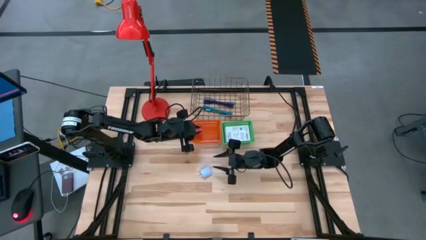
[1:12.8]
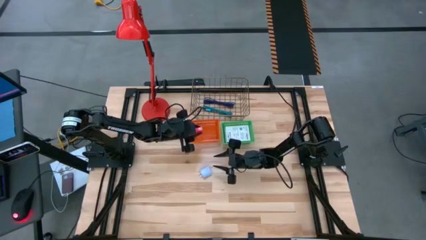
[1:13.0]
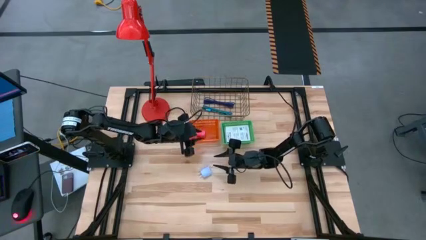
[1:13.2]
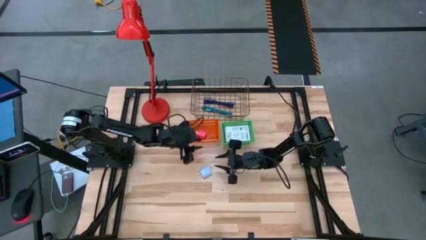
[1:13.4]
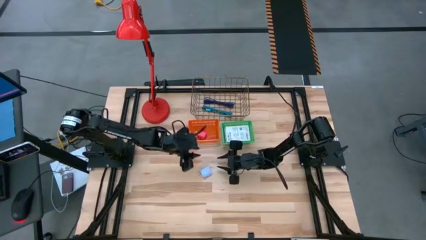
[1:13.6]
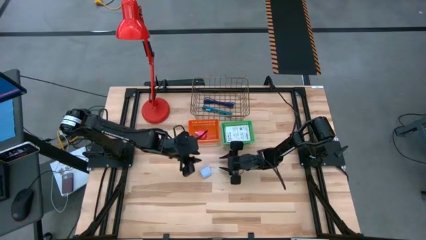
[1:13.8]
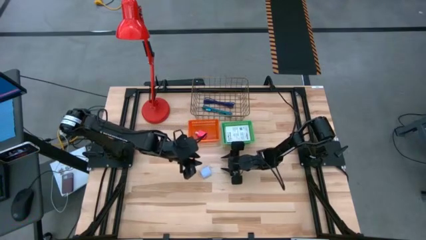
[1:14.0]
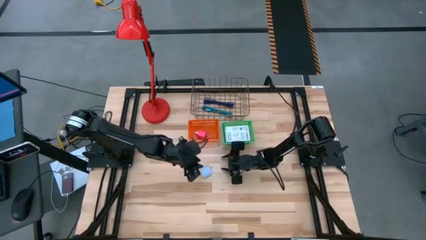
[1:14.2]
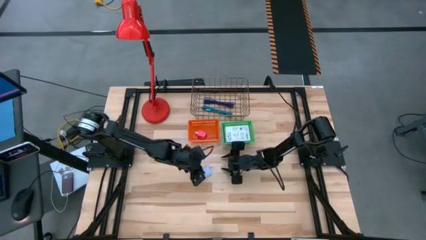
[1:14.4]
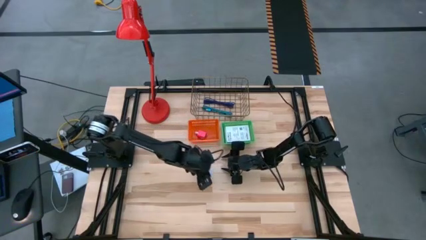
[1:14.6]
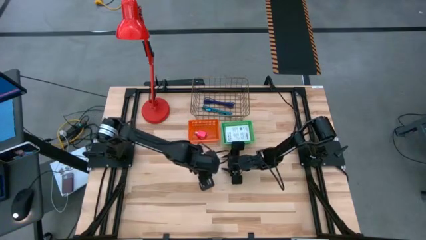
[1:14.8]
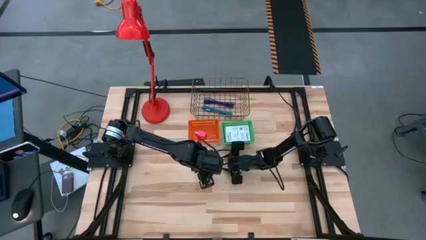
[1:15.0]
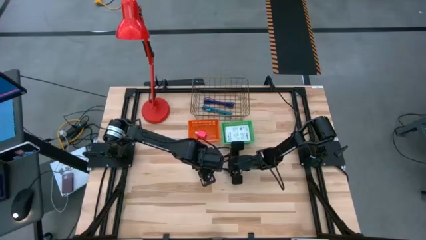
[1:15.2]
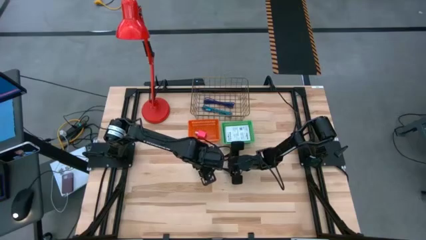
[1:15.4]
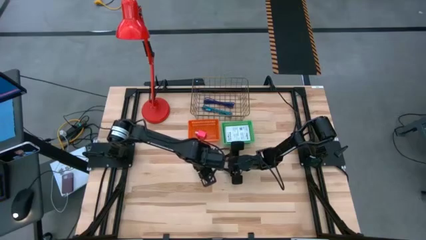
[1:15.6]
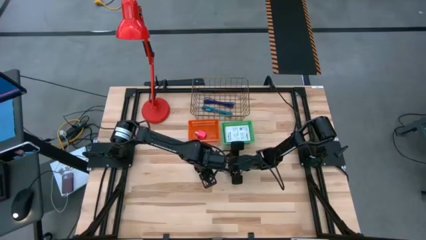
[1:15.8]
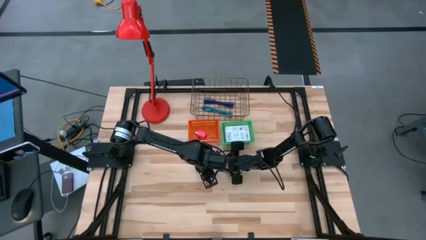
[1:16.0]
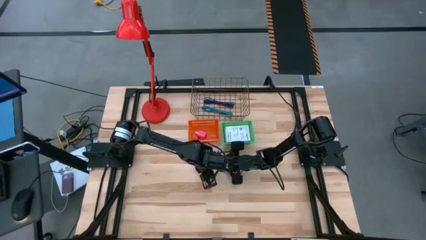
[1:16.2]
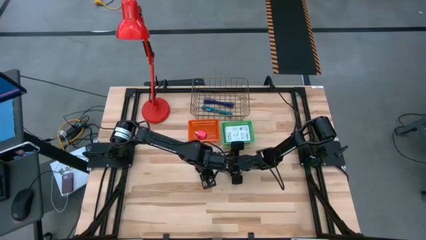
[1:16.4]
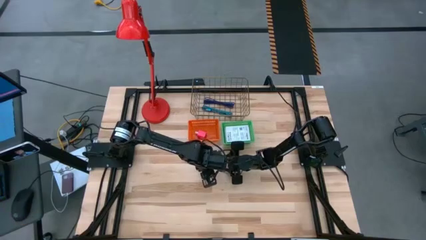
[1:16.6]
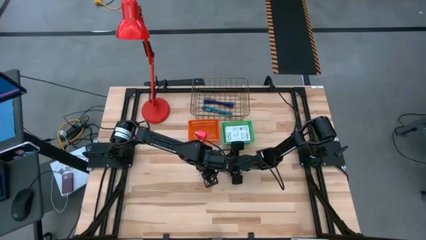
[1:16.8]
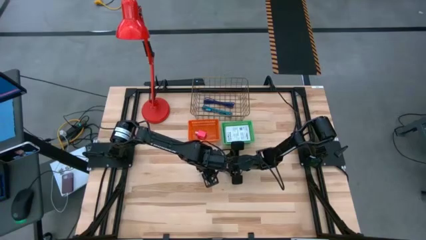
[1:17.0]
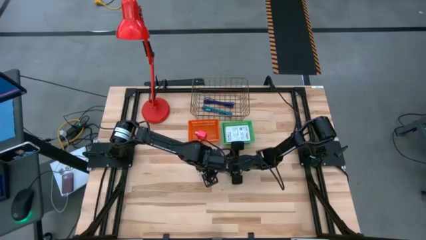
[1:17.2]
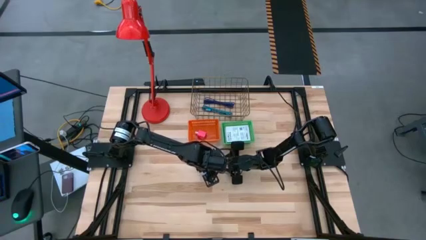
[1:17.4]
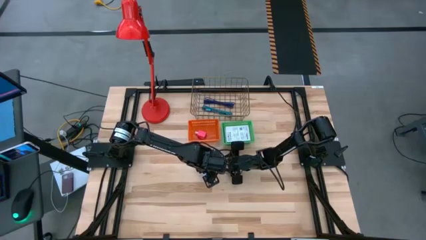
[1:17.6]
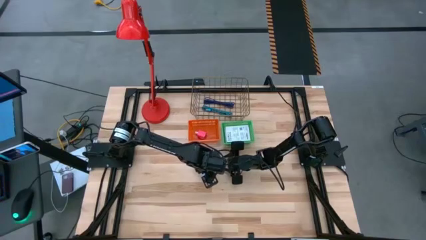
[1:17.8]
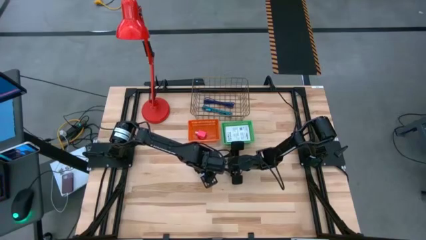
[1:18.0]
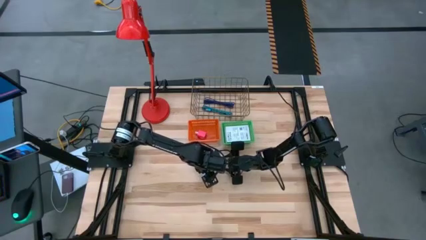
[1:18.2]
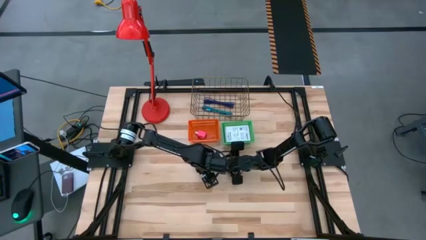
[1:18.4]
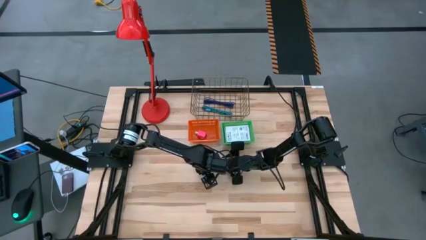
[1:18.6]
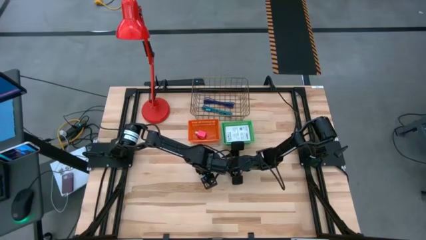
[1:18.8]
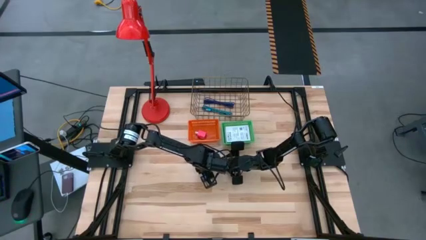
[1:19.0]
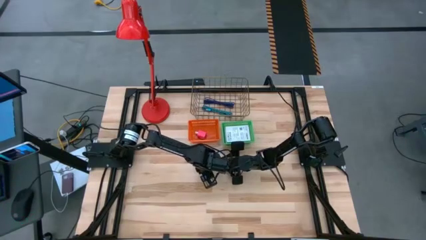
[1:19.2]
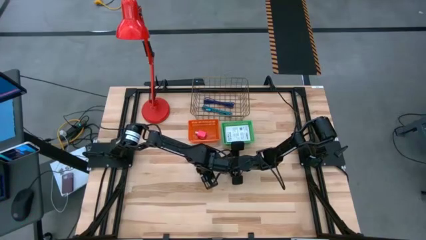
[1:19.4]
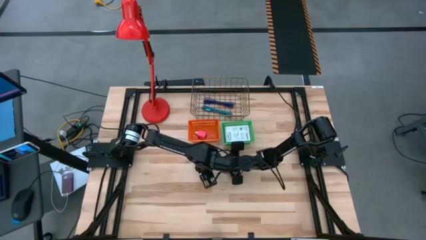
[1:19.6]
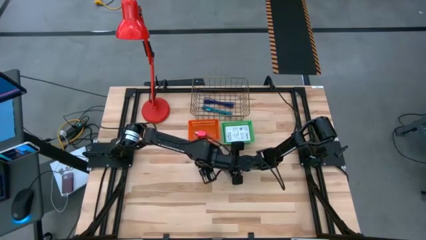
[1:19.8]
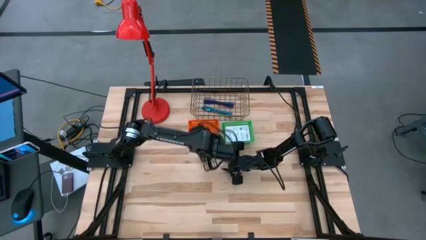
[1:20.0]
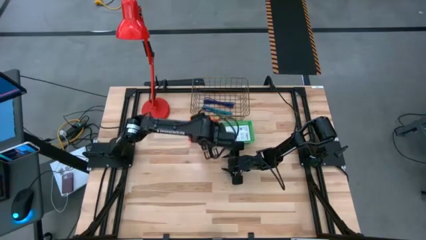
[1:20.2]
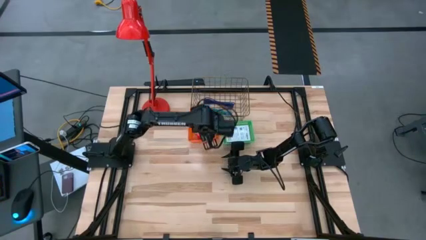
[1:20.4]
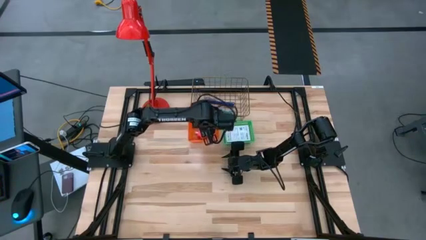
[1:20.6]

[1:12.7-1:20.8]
Task: Pick and place items into bin
Put the white charger adapter into the orange bin

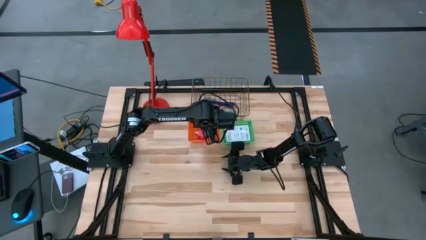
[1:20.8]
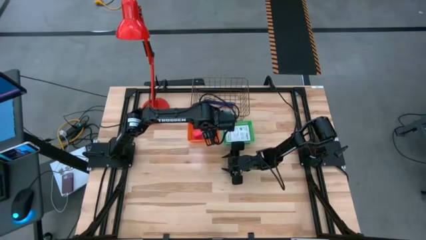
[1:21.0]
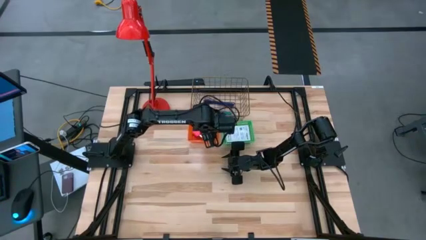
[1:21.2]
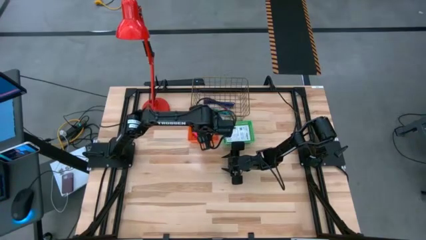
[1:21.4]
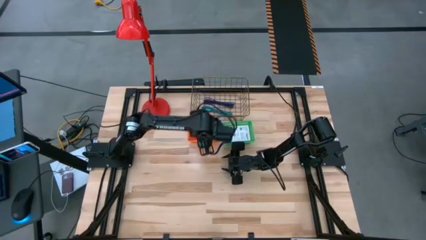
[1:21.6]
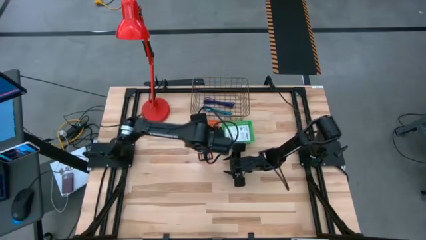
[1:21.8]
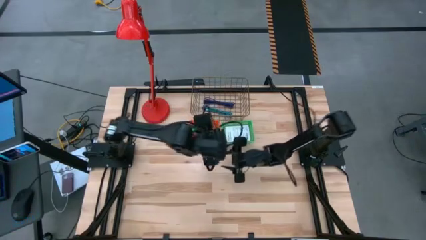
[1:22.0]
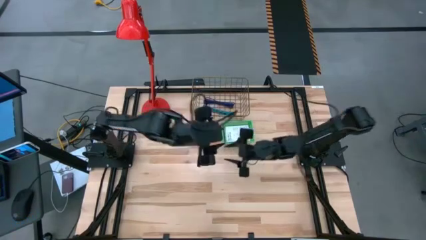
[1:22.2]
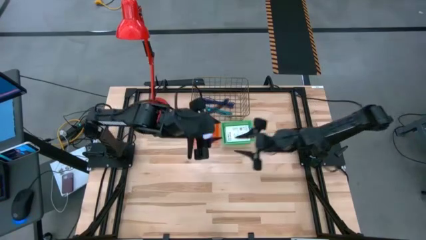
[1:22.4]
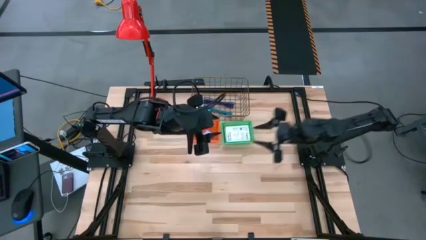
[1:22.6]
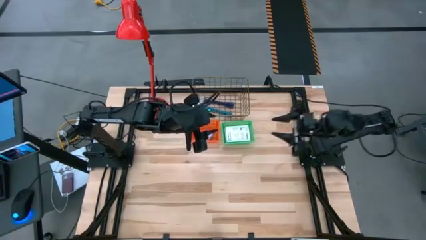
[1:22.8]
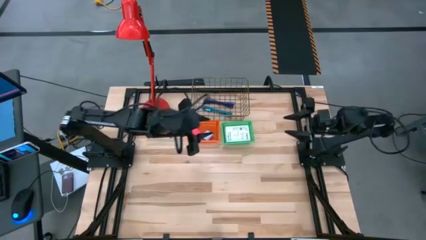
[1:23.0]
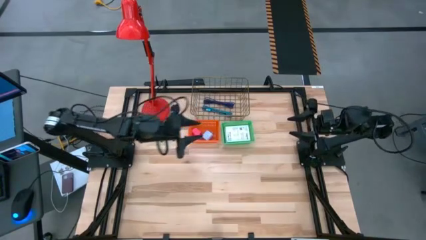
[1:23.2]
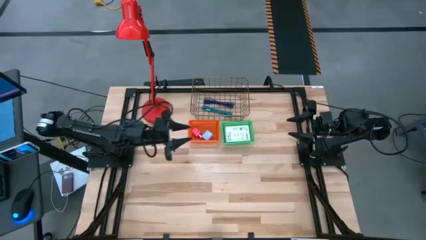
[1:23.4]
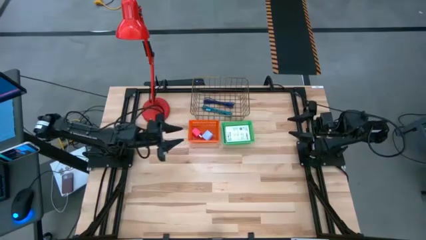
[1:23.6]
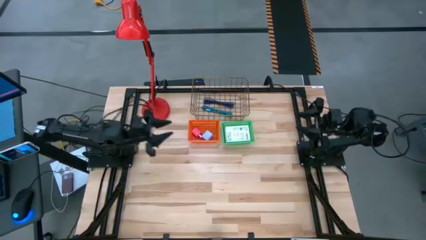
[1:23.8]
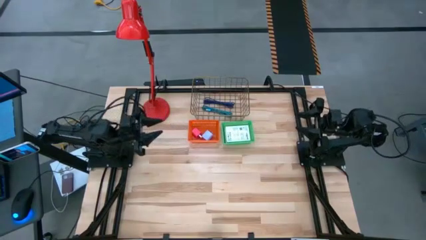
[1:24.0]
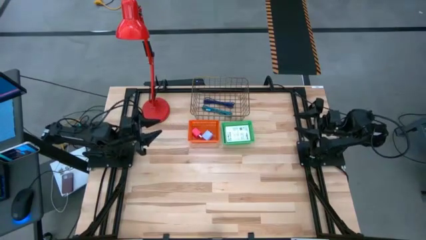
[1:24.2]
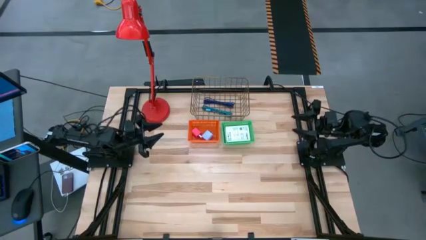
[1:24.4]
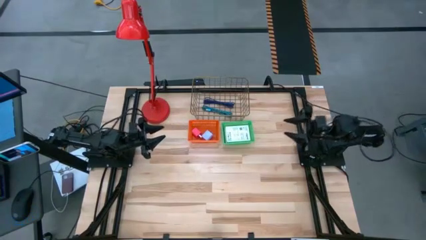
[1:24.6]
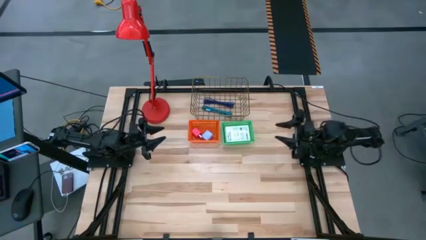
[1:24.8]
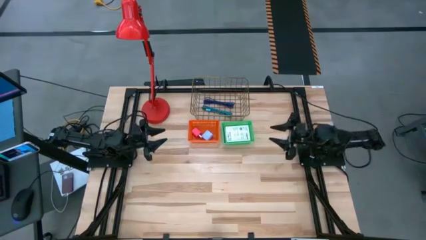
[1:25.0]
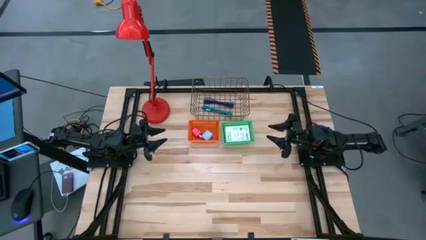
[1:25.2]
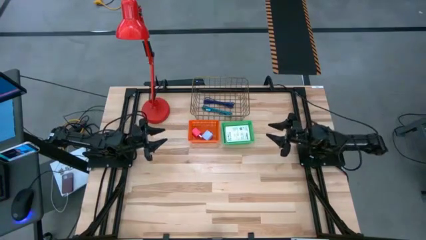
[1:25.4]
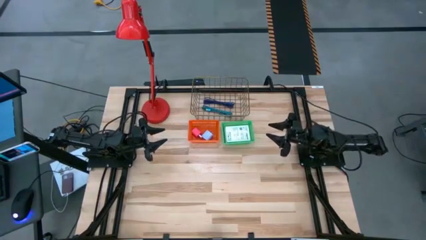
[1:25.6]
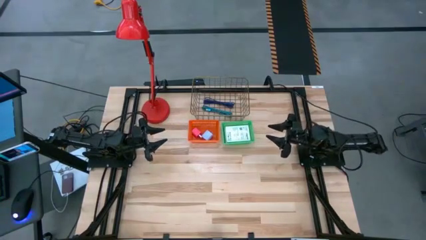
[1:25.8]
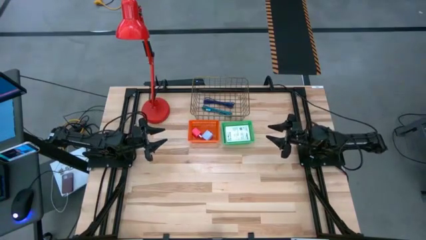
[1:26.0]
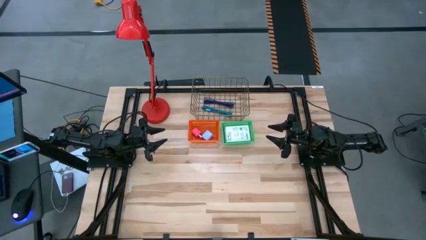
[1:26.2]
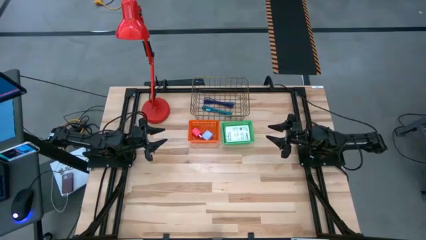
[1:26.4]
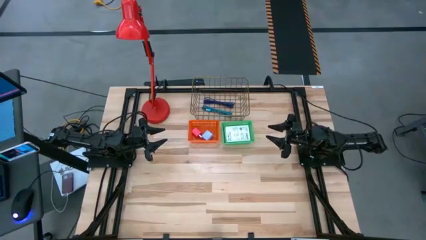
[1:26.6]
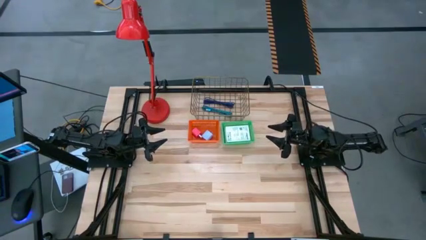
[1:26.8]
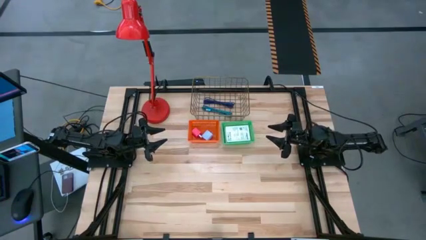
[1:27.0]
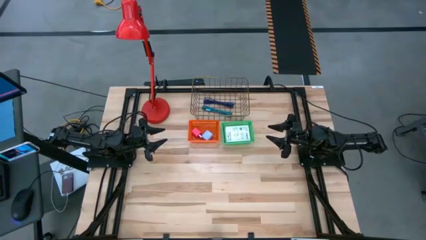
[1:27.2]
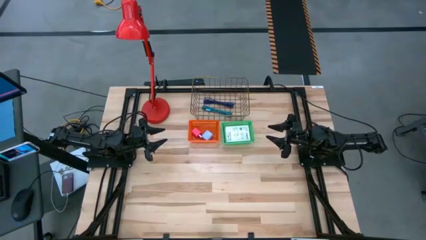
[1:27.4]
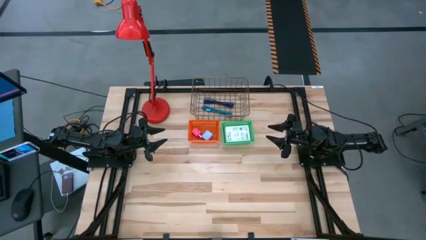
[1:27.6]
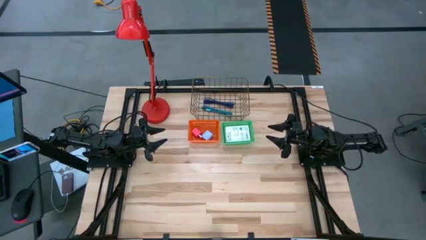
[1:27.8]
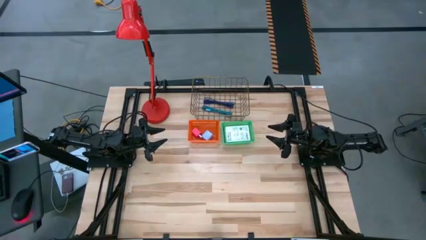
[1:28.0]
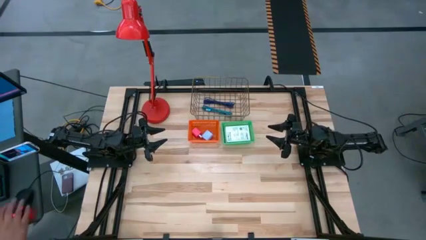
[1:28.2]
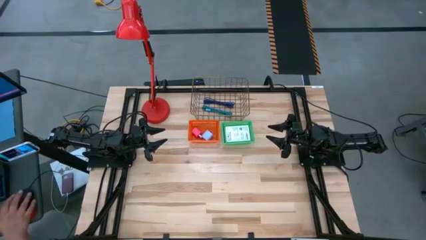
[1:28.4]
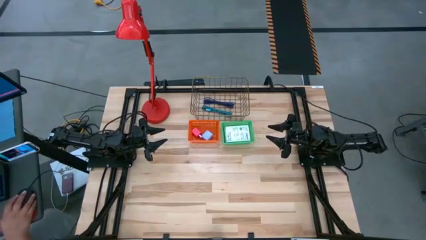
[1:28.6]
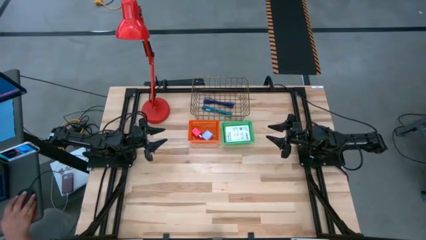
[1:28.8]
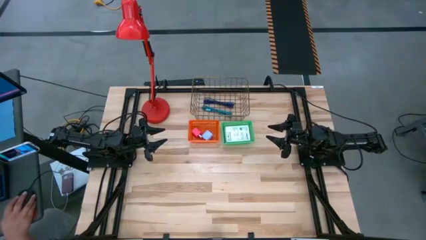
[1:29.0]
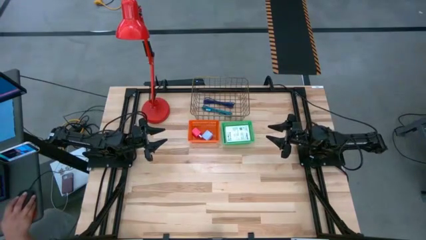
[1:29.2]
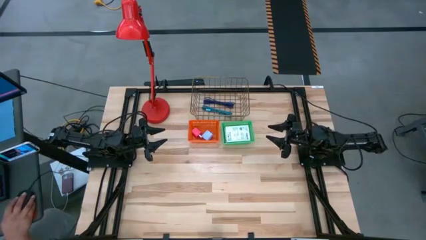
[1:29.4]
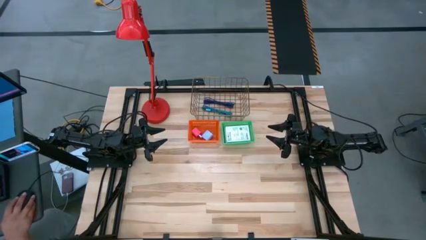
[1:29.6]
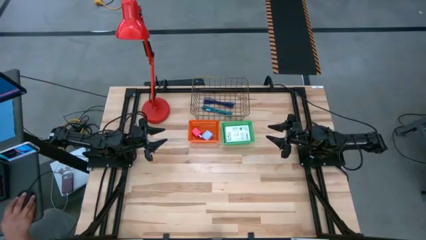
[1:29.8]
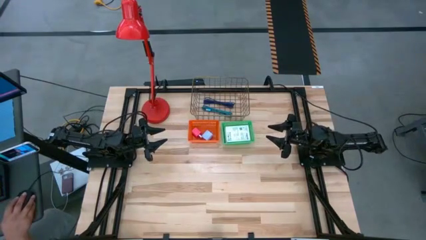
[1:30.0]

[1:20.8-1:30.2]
Return to Home Position
